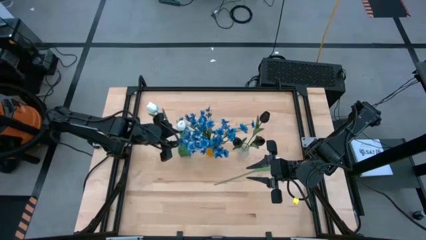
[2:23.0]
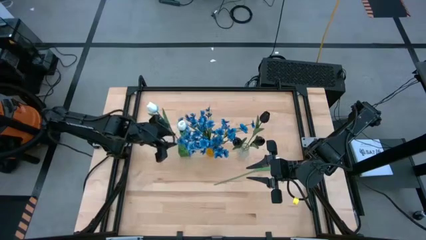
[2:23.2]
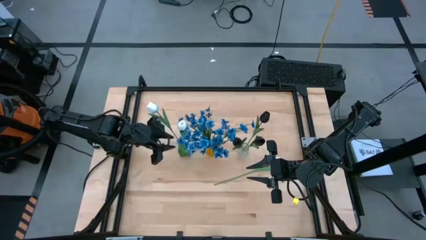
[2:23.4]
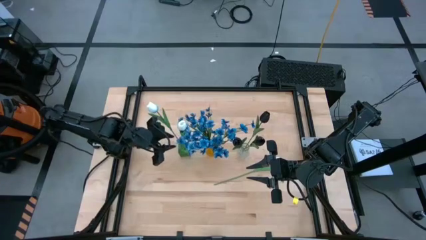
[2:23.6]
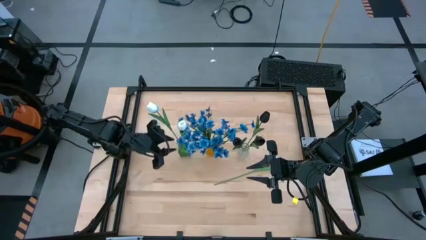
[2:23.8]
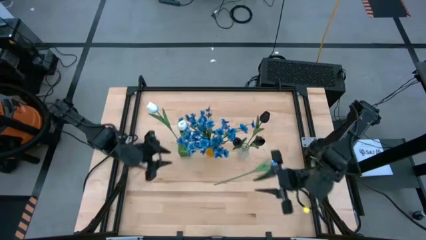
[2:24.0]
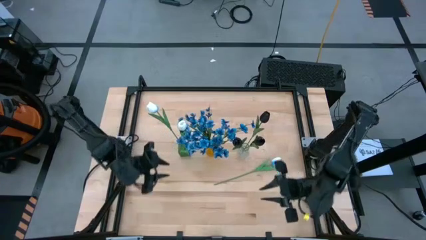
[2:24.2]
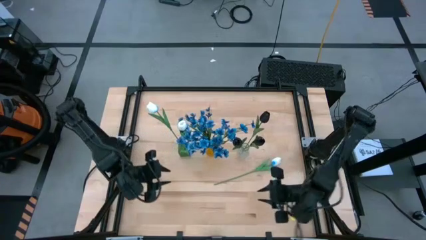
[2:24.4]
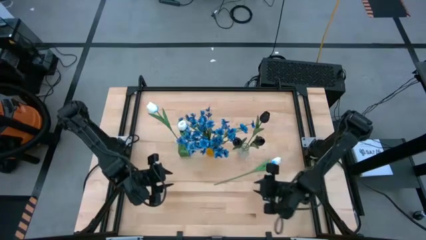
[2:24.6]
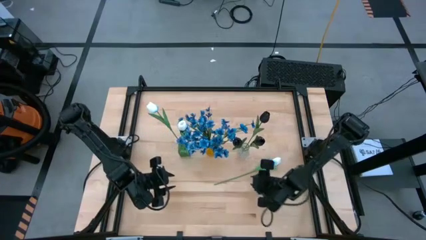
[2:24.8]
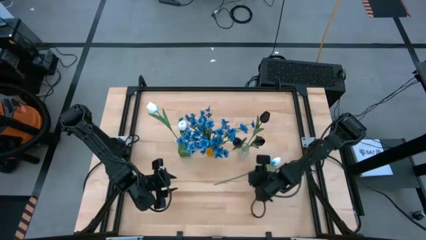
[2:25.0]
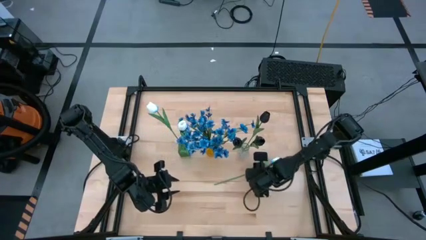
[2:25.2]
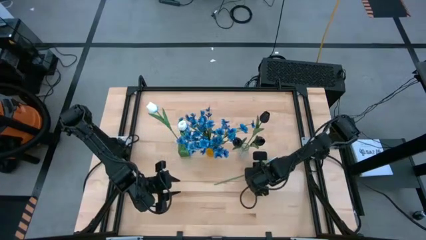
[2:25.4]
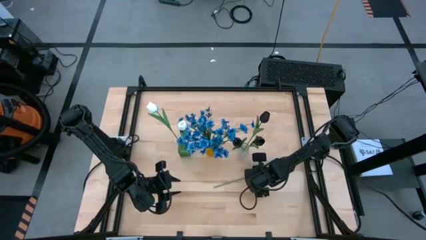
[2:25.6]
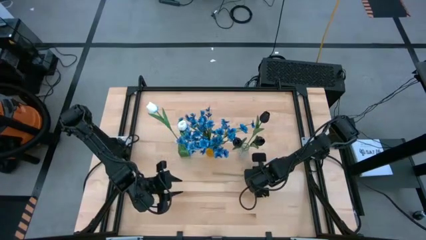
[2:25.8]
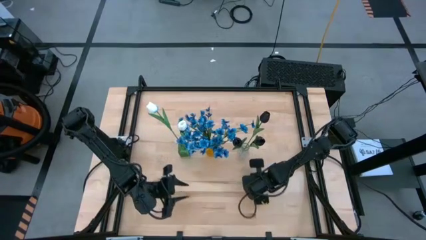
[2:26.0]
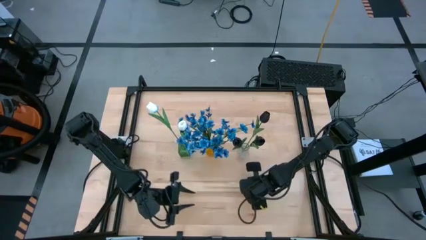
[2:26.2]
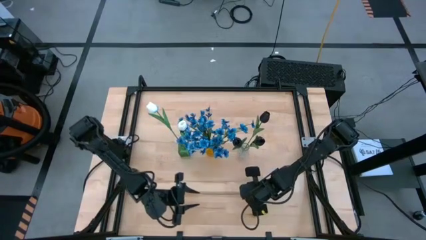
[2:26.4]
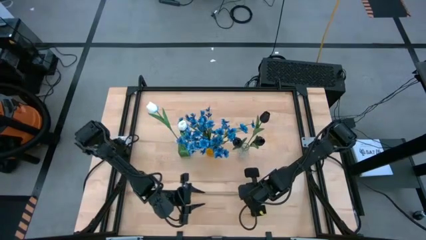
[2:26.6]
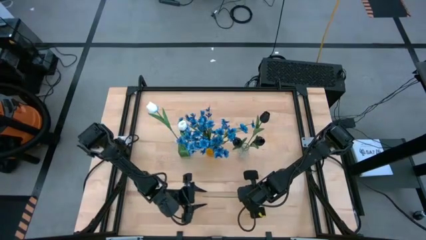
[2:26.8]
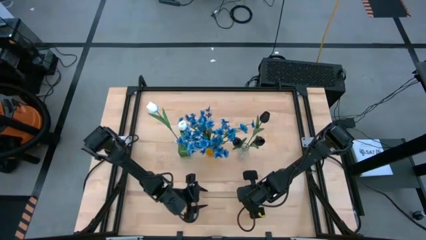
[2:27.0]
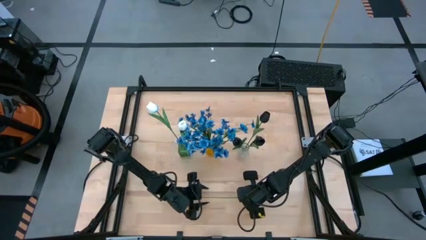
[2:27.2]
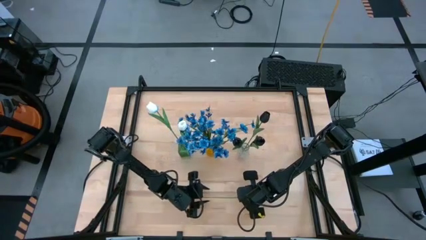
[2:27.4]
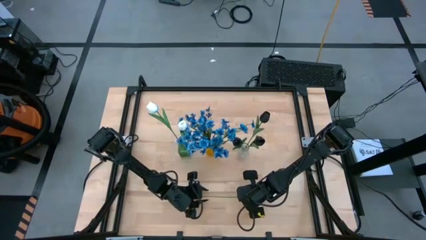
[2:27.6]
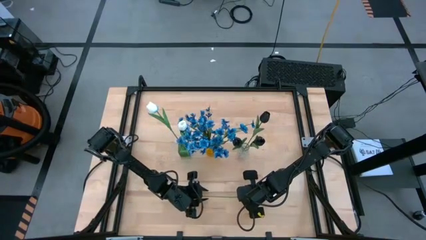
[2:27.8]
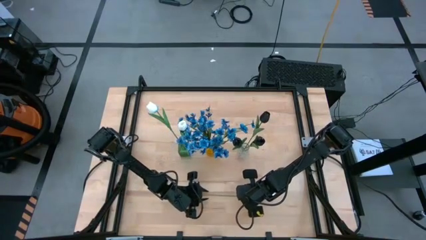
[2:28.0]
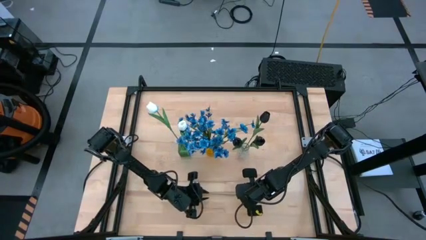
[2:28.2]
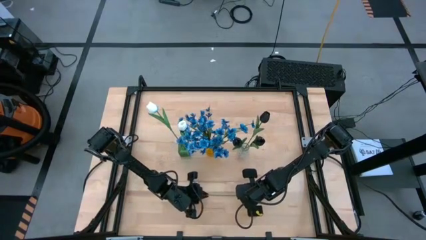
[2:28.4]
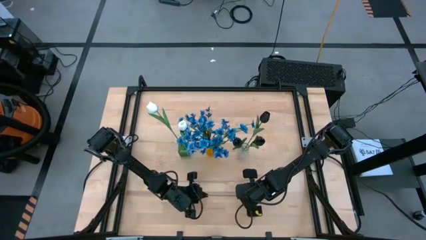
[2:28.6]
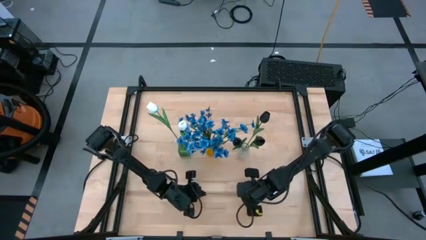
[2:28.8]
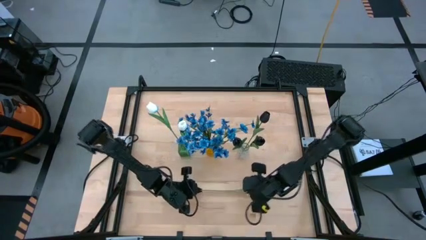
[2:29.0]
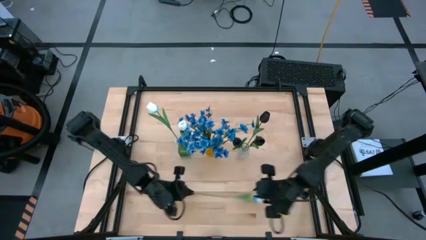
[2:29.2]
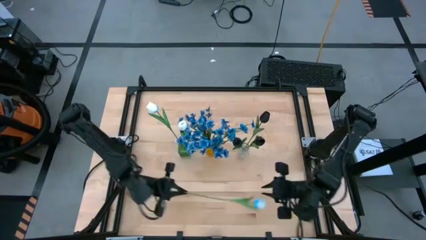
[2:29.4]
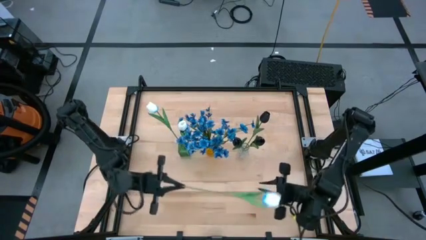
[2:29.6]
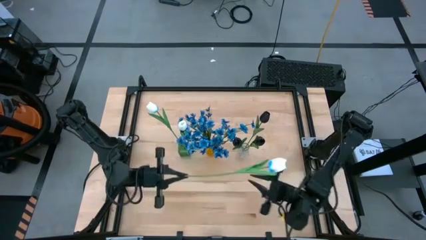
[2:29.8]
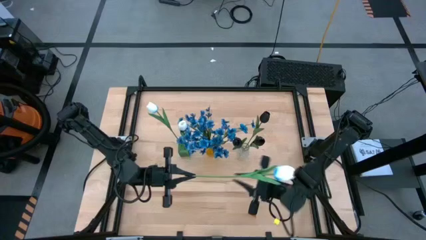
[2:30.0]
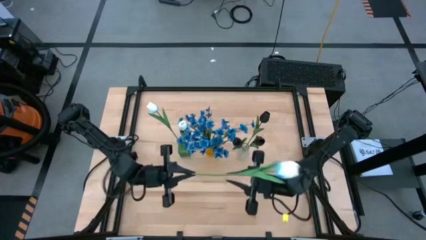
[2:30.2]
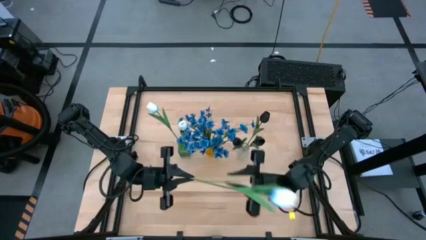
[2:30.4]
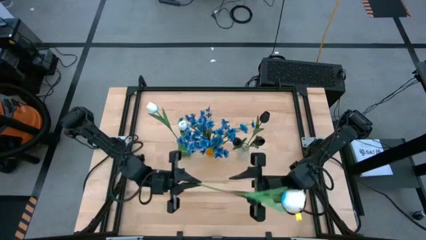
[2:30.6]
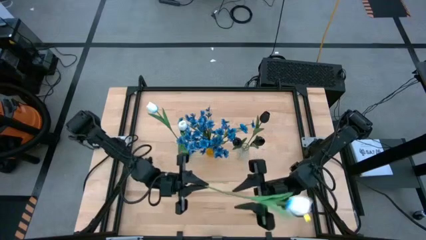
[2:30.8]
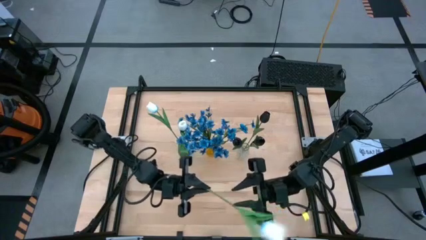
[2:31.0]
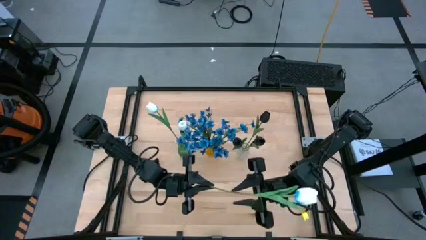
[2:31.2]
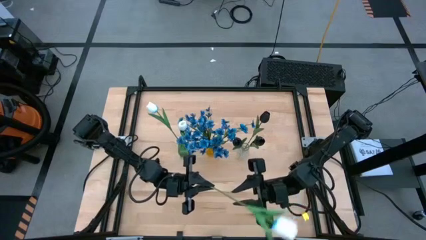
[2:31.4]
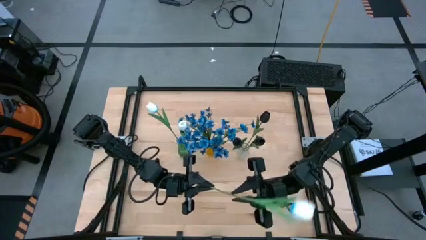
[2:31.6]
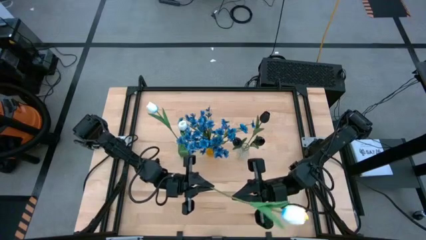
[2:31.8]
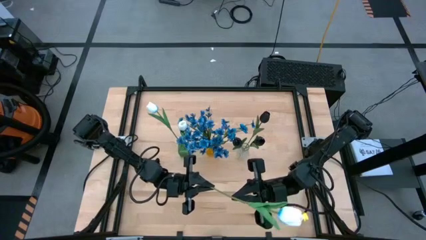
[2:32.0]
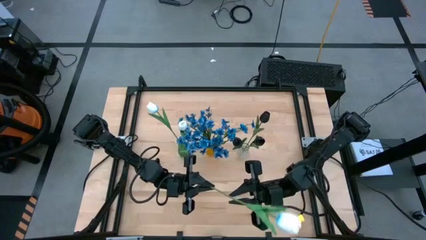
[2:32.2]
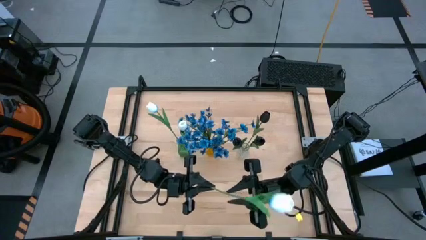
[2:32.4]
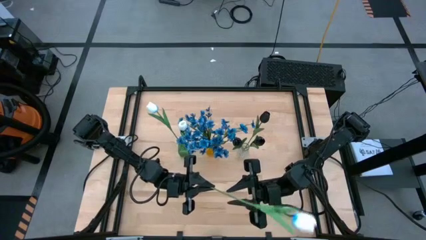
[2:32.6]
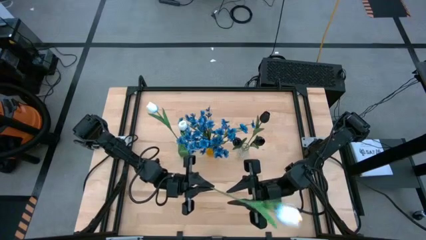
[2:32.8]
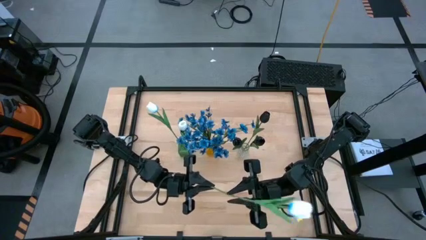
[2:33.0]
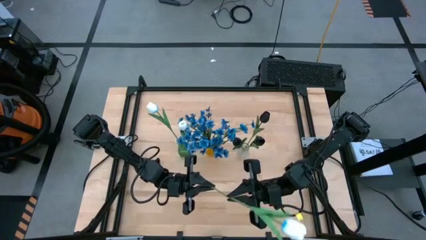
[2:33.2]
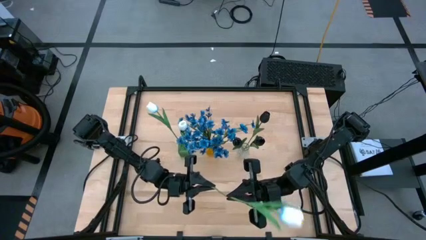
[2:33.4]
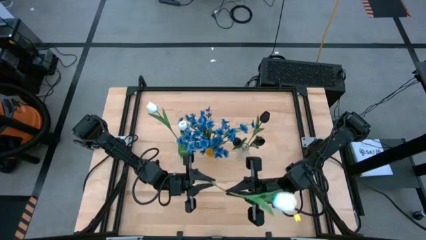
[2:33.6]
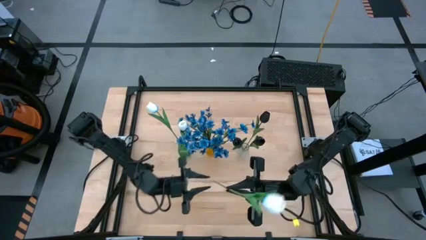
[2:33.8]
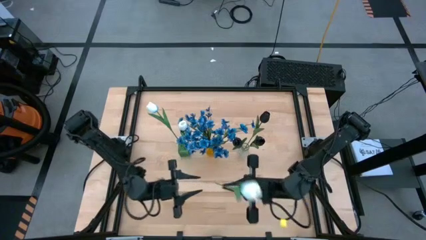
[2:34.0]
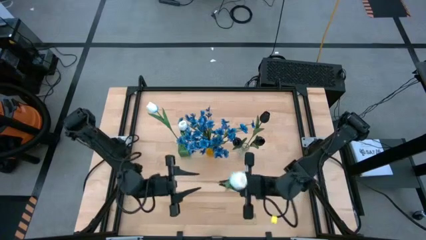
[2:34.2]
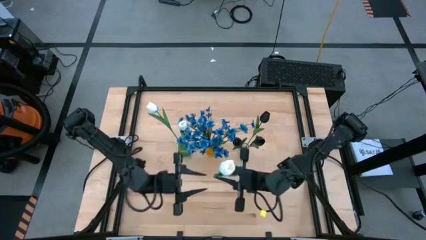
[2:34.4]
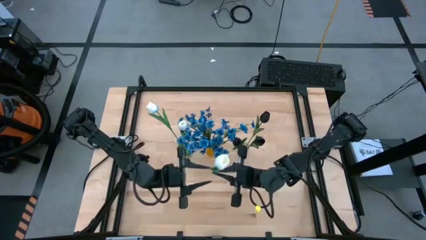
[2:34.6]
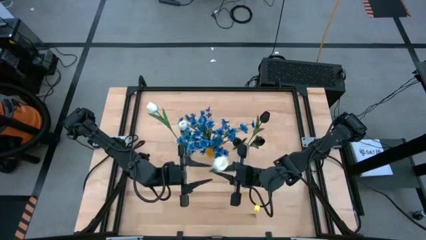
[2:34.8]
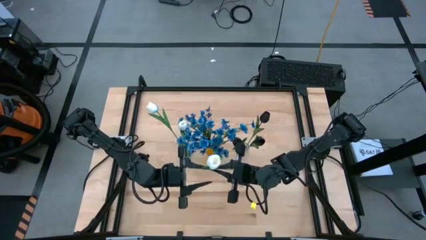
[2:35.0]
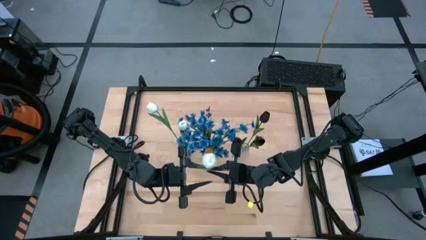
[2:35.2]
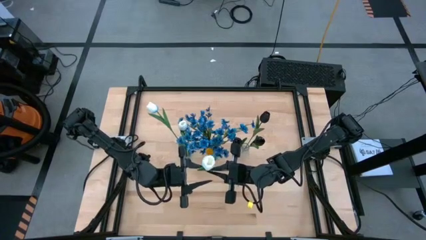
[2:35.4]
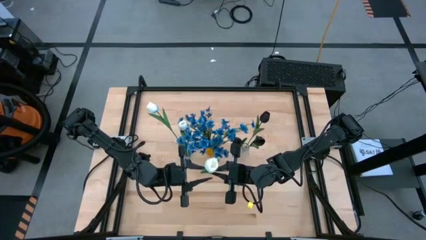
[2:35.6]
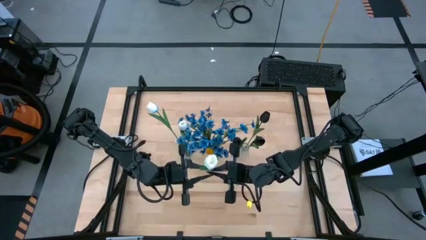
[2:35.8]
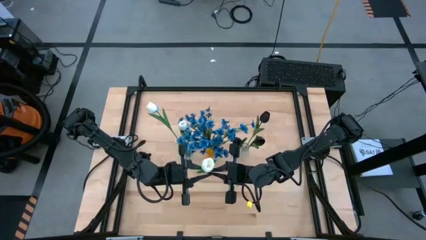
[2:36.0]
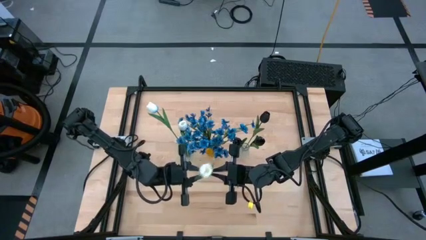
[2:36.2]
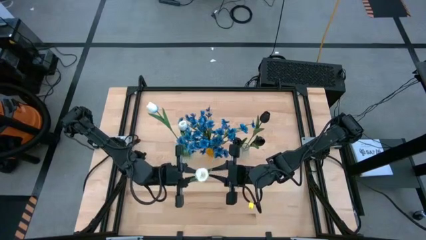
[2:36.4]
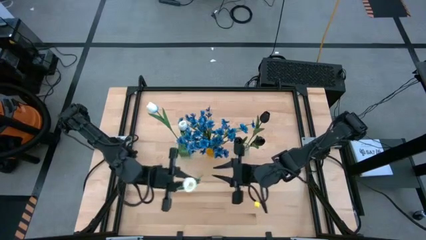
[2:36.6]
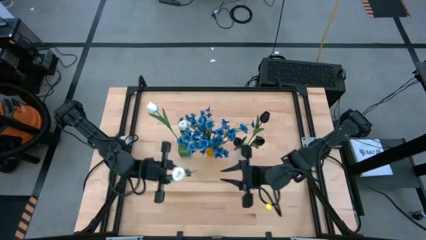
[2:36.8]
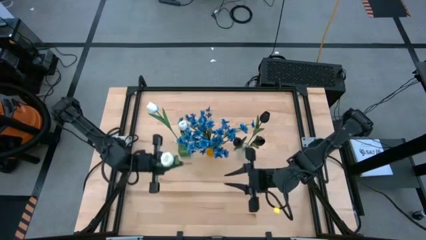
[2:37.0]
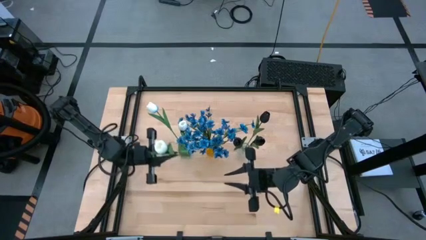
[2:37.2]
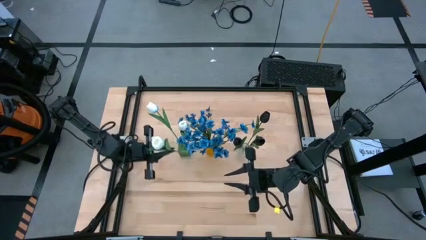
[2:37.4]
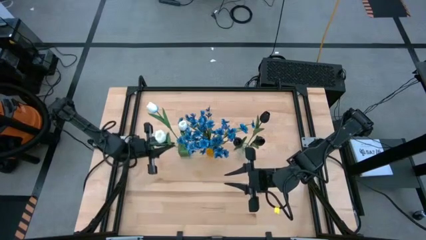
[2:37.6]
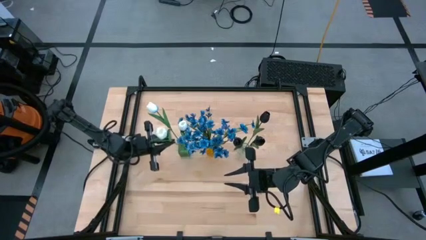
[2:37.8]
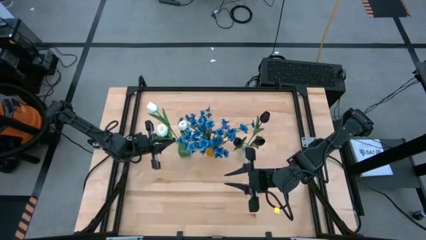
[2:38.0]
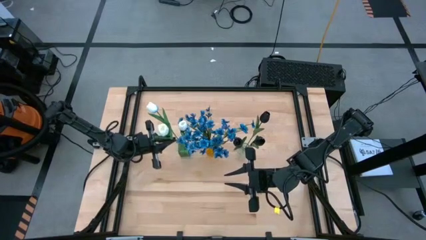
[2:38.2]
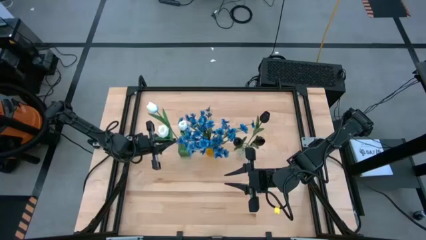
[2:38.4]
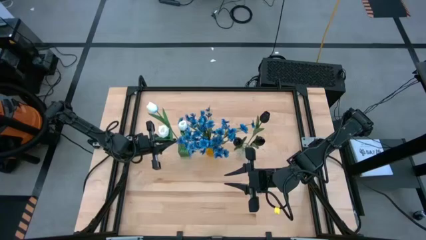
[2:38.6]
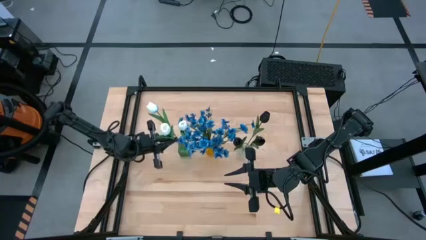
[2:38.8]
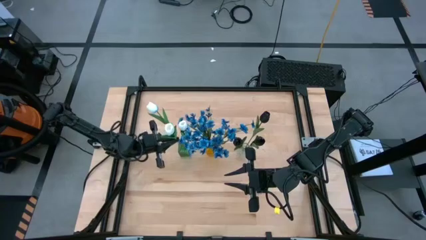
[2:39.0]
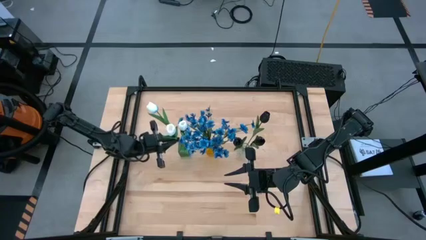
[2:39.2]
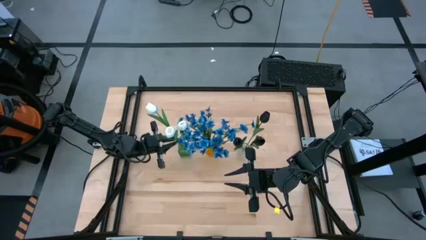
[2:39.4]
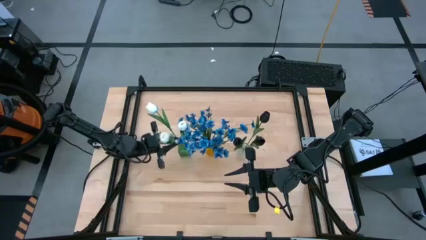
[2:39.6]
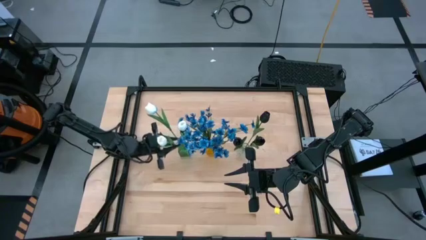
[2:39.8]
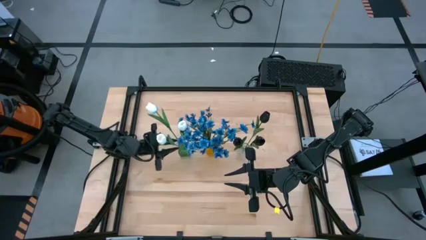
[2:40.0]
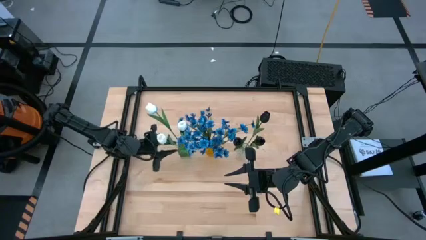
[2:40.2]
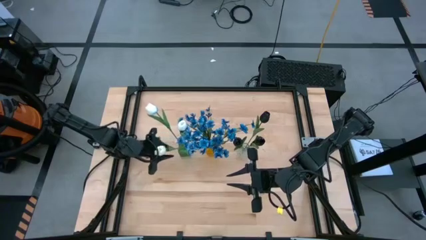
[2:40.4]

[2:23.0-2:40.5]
Task: Sort flowers into vase by color
Put the white flower into the green vase
